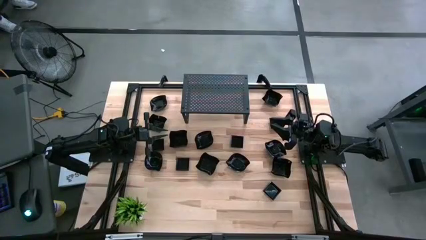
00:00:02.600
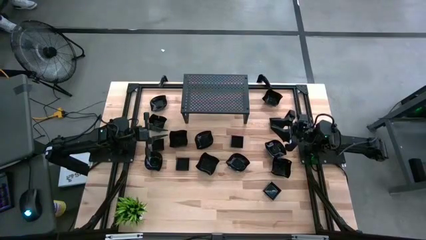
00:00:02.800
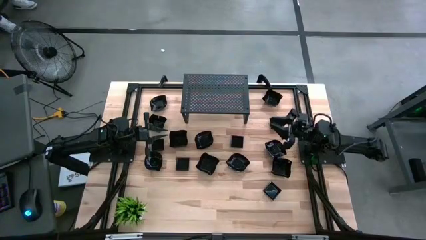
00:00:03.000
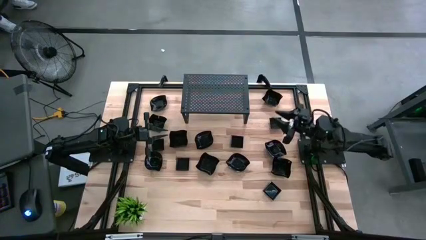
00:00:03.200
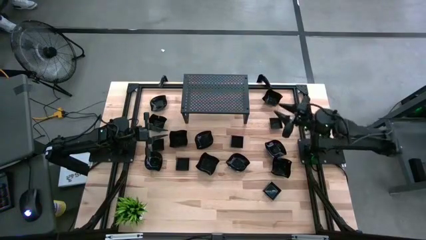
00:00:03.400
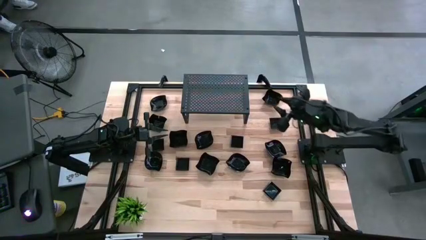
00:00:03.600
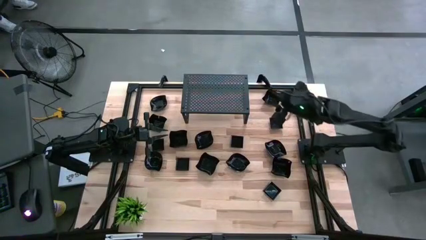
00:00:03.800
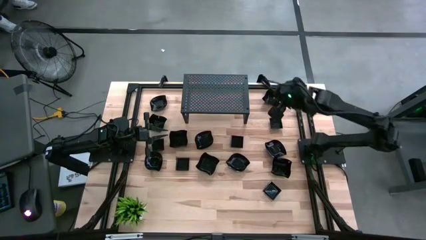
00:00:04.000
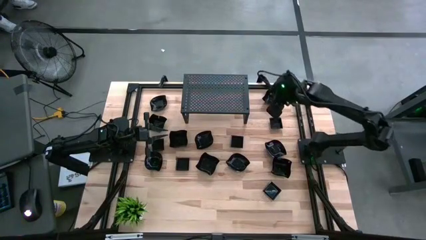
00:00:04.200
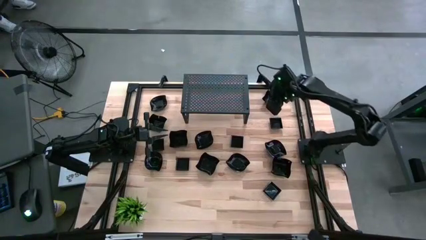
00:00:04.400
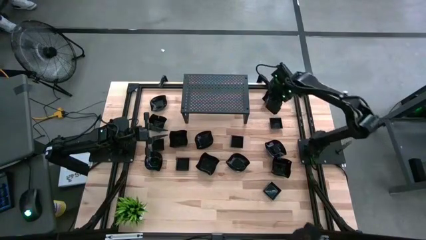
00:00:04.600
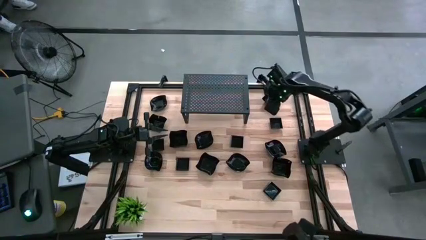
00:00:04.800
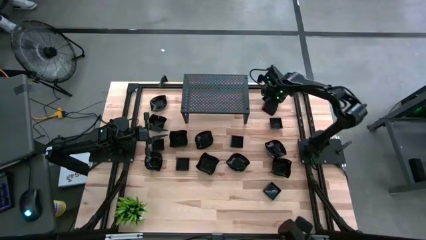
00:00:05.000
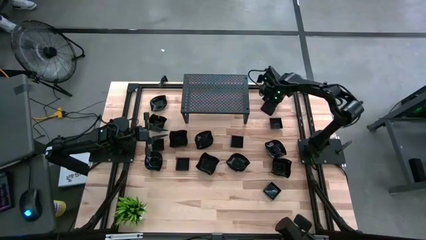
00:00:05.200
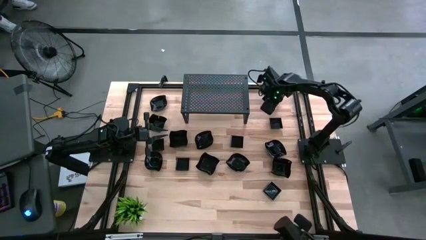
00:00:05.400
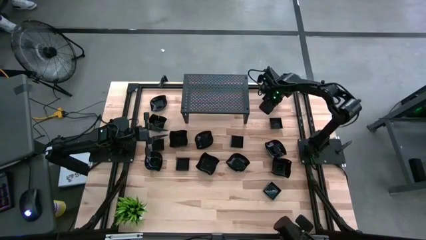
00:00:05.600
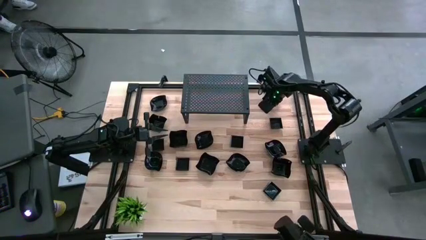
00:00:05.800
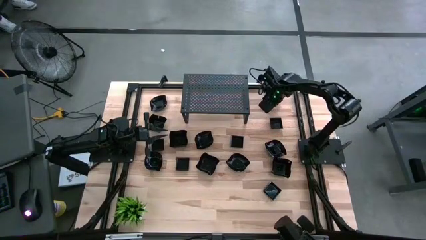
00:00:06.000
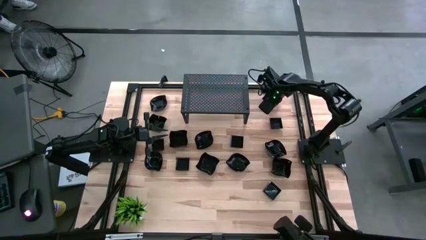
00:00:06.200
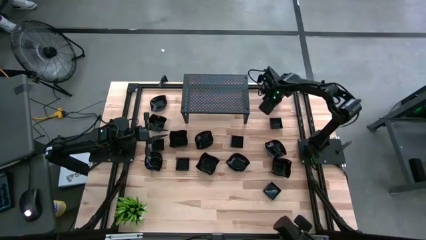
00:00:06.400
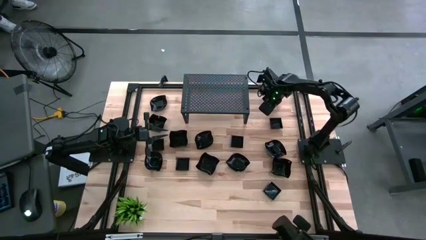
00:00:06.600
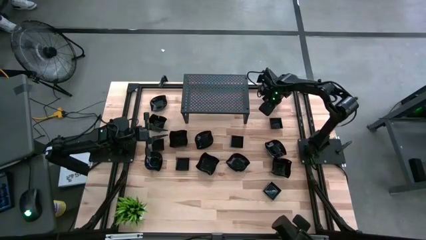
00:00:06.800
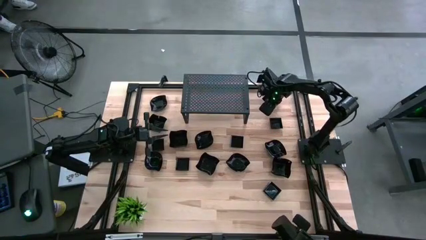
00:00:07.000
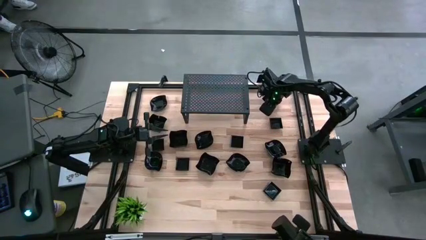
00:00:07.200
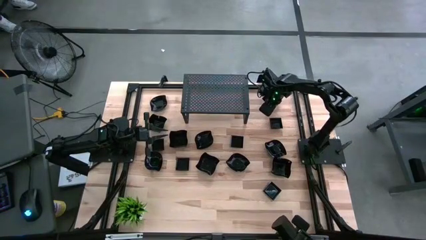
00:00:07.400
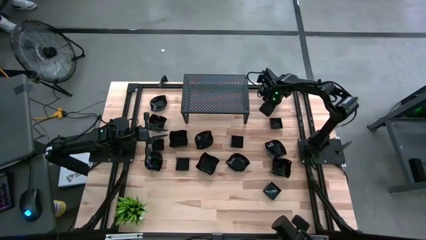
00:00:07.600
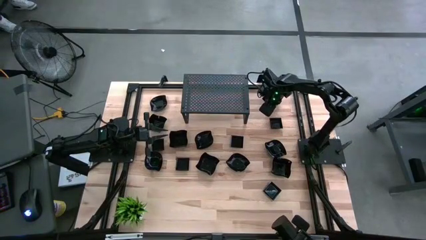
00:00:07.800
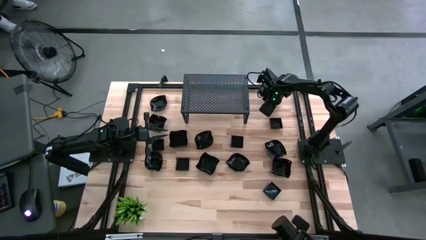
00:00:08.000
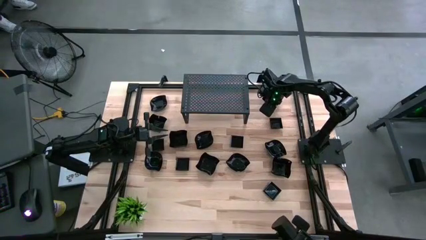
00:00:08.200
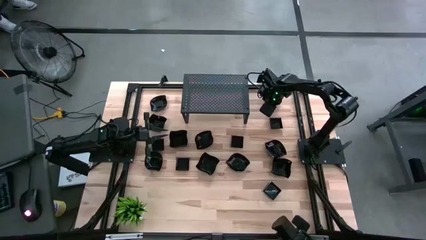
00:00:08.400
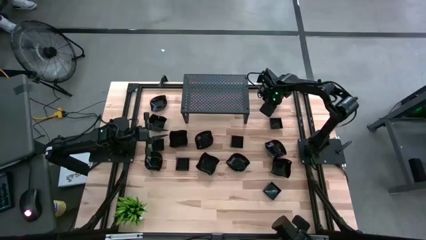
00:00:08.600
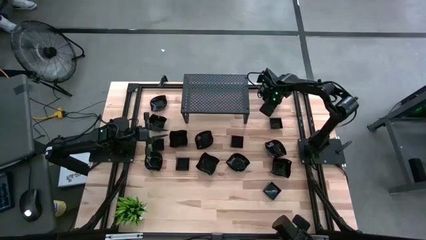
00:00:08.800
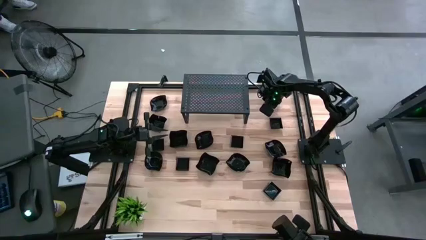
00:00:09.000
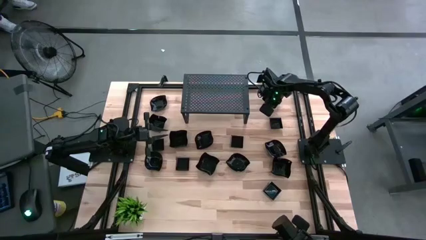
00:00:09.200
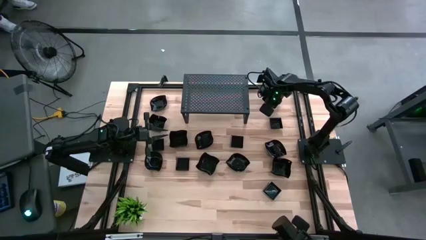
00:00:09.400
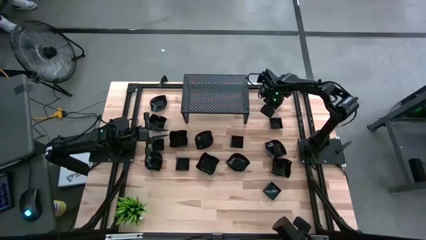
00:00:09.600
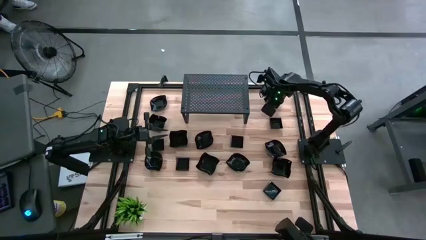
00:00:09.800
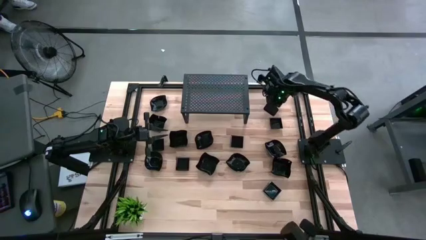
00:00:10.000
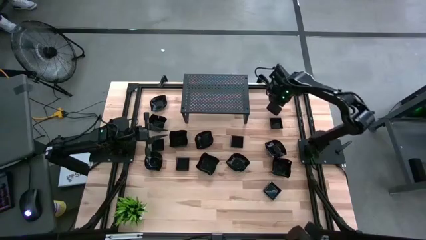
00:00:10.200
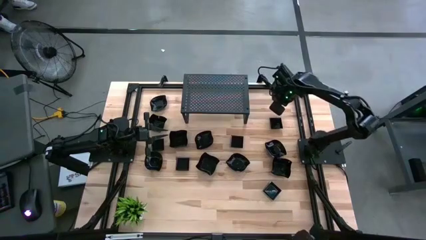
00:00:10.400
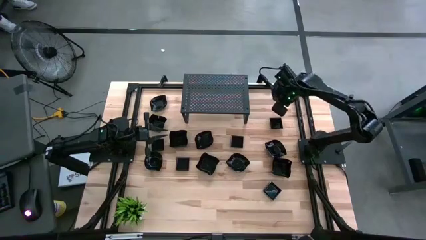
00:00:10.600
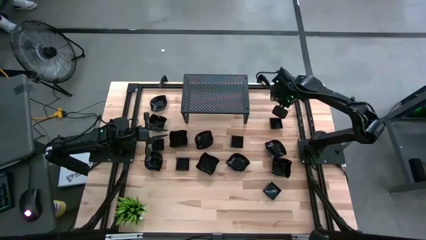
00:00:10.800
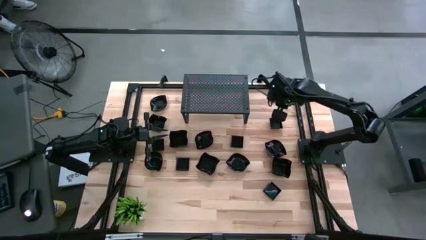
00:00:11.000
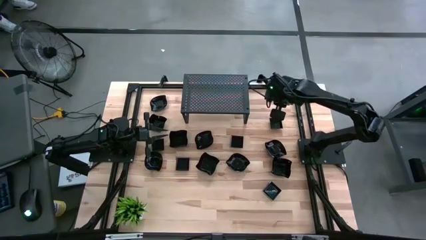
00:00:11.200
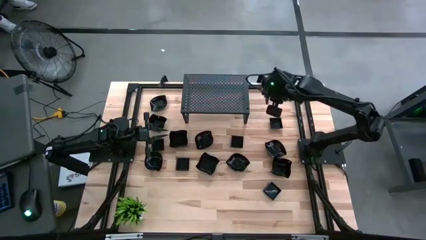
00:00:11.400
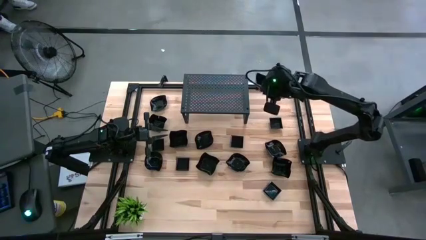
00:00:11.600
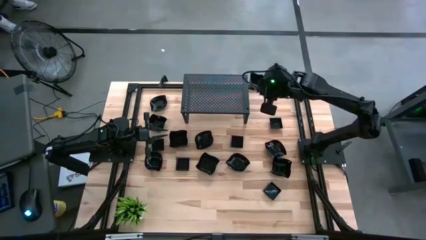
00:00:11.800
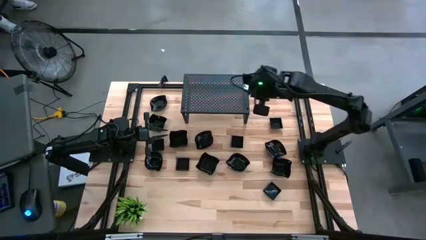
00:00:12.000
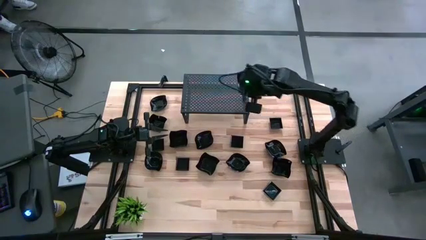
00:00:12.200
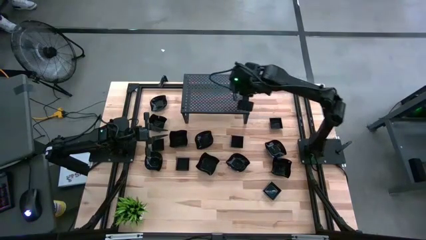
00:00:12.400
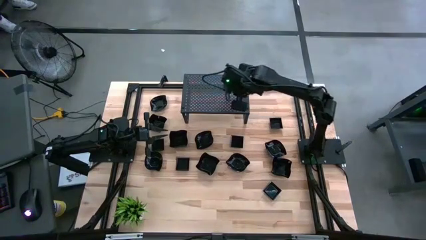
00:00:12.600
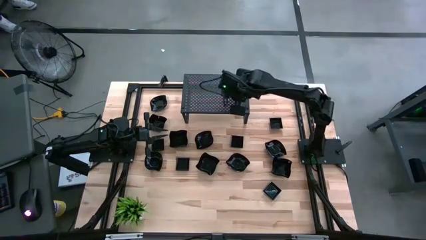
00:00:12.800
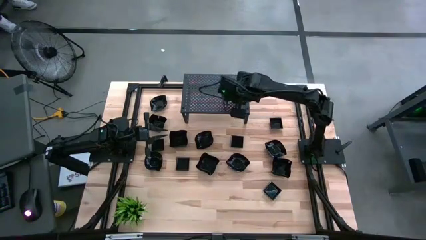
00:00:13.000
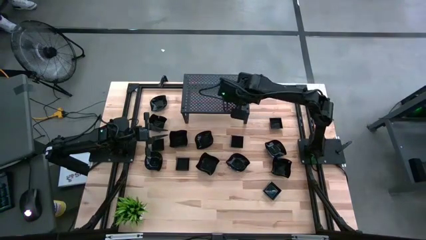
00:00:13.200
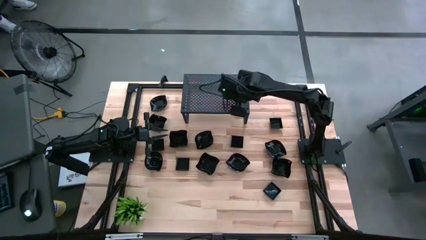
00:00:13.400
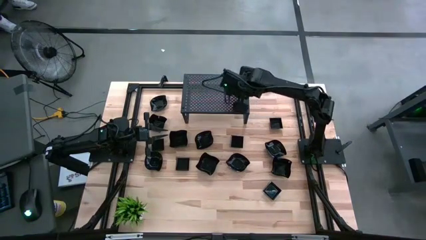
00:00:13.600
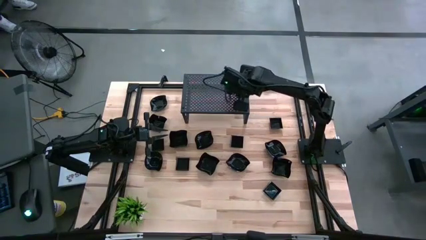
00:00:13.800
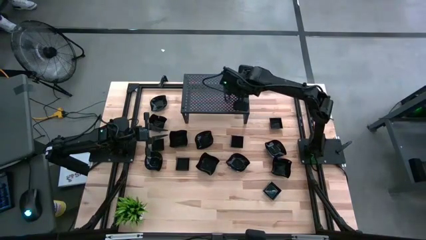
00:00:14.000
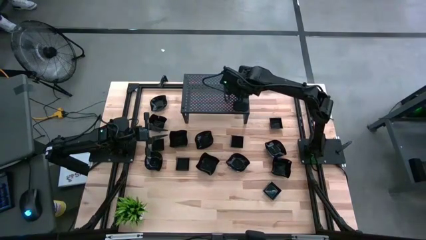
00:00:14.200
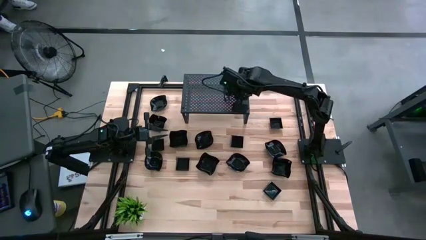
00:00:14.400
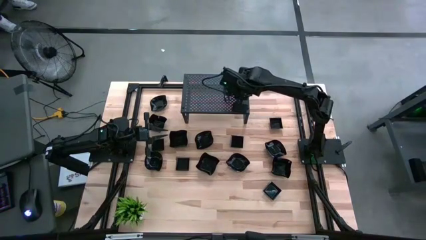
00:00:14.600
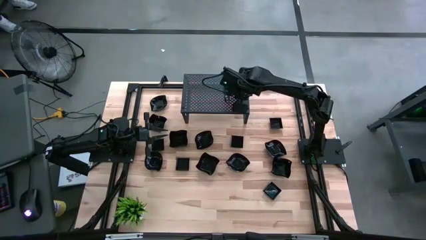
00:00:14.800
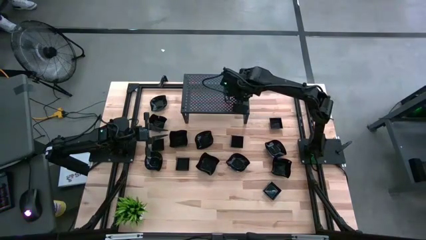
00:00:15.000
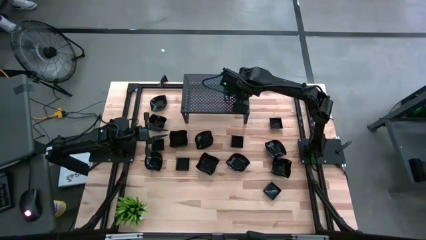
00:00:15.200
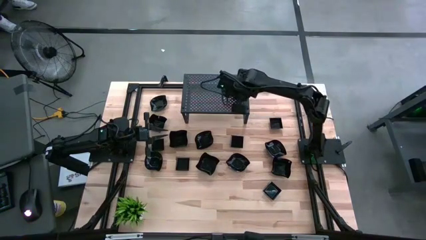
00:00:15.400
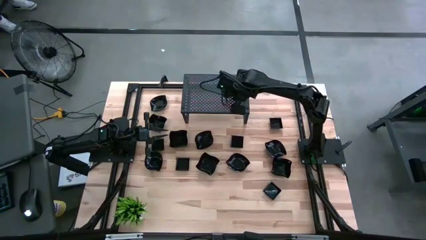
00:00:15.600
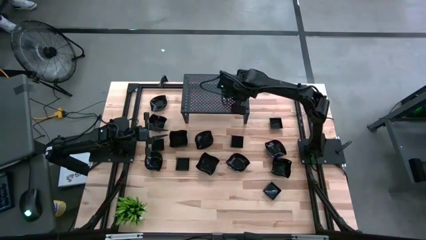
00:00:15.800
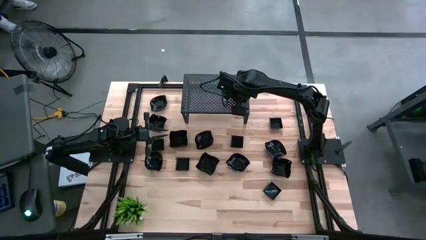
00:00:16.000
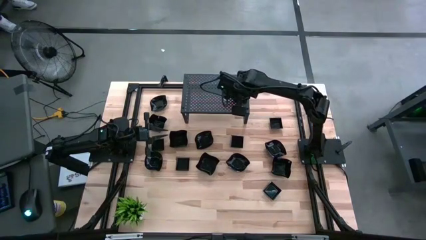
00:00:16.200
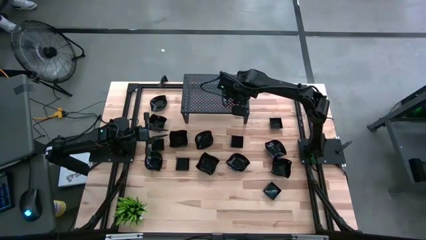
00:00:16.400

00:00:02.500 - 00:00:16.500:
Task: Pick & Place Mini shaped plates
Put the distorted square plate on the shelf
